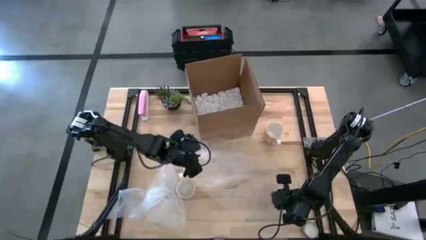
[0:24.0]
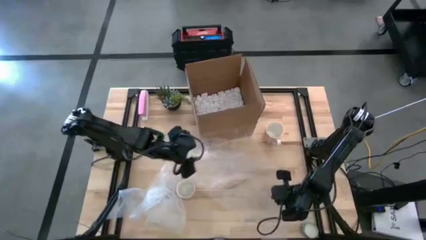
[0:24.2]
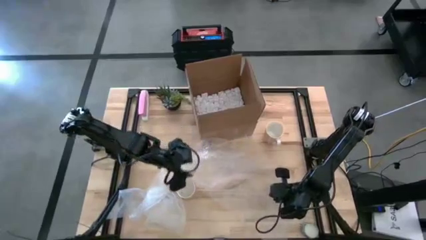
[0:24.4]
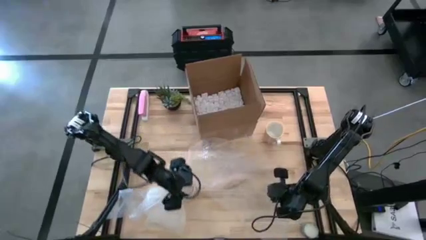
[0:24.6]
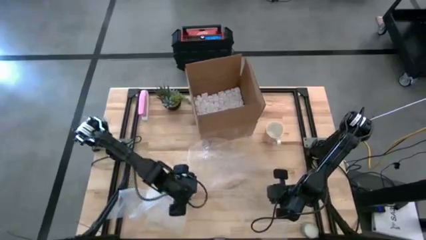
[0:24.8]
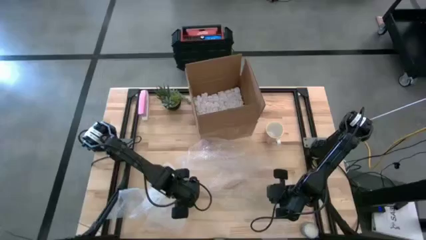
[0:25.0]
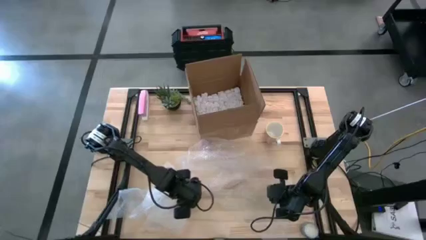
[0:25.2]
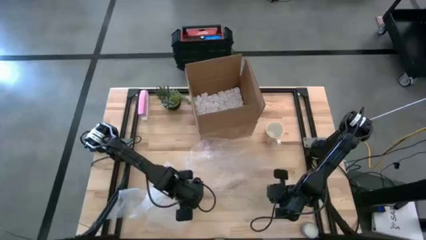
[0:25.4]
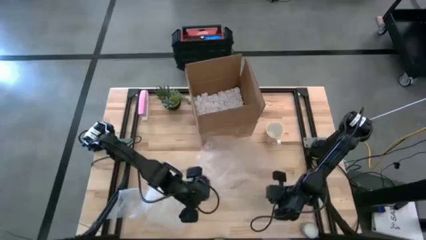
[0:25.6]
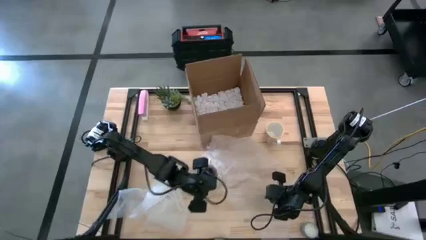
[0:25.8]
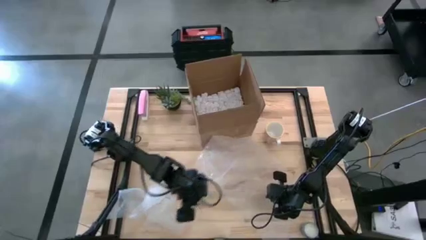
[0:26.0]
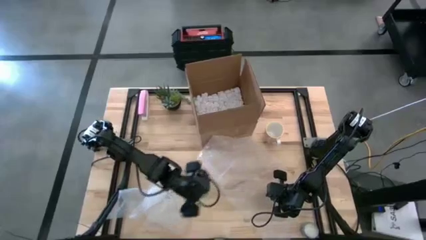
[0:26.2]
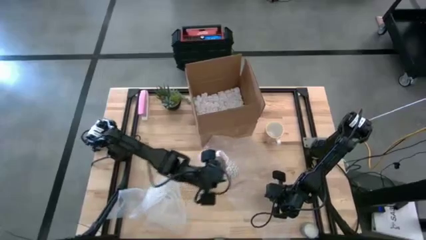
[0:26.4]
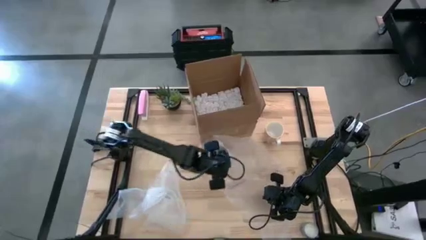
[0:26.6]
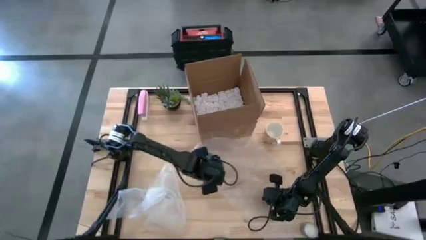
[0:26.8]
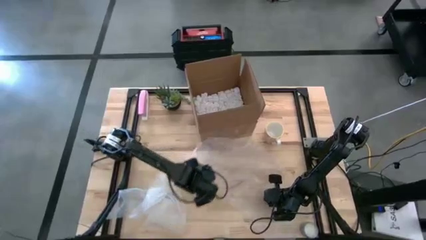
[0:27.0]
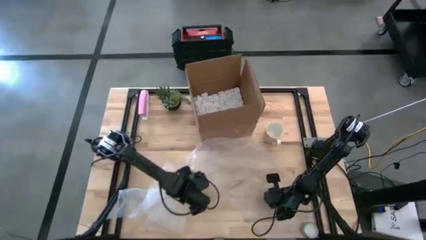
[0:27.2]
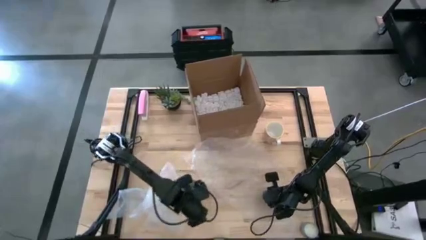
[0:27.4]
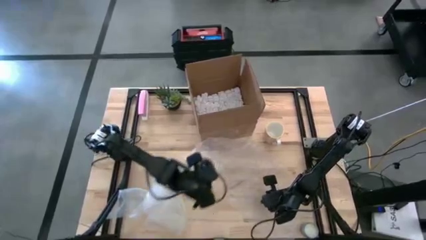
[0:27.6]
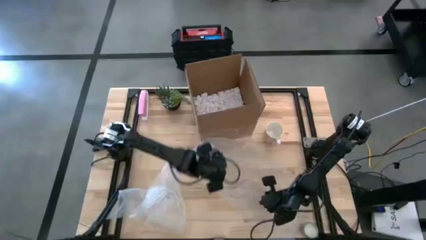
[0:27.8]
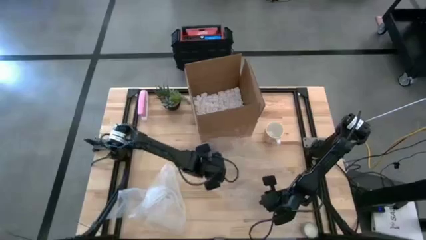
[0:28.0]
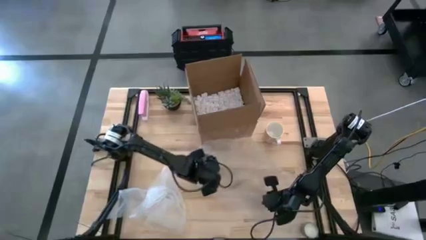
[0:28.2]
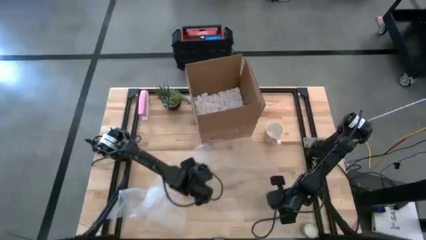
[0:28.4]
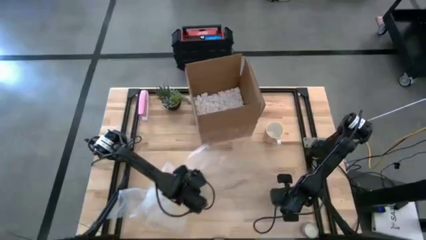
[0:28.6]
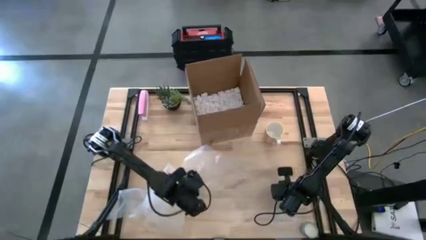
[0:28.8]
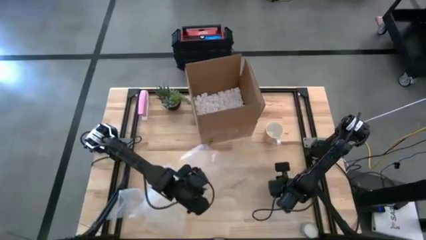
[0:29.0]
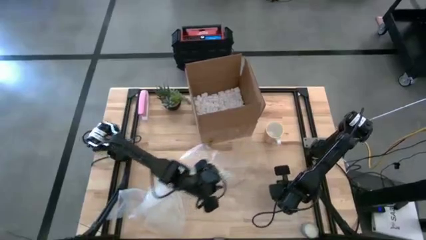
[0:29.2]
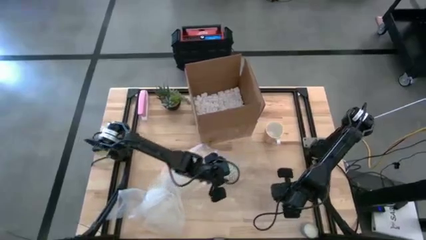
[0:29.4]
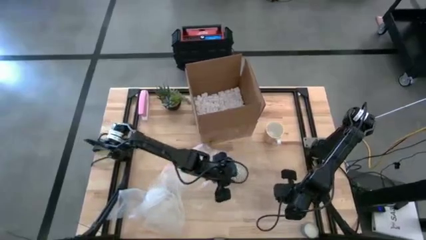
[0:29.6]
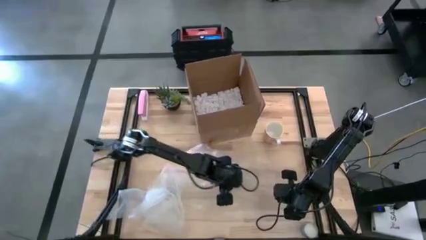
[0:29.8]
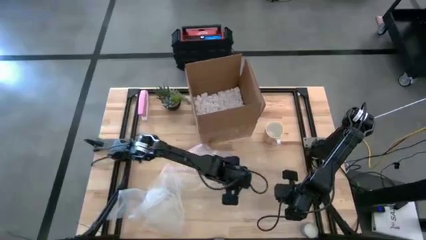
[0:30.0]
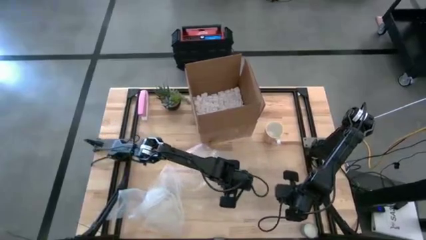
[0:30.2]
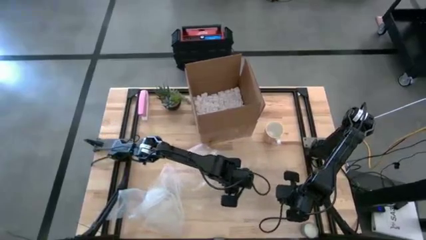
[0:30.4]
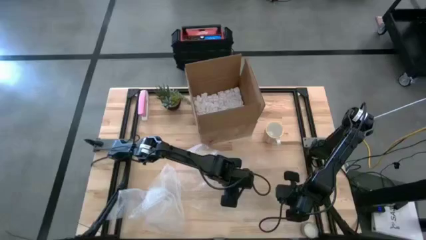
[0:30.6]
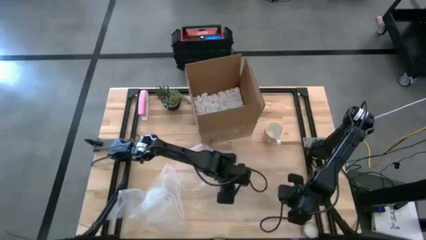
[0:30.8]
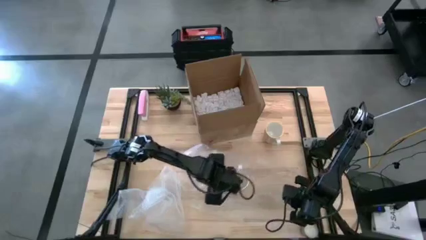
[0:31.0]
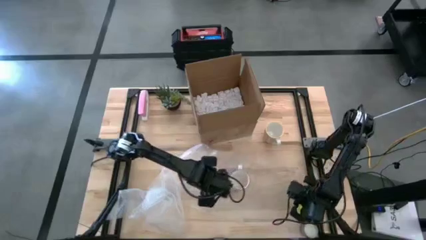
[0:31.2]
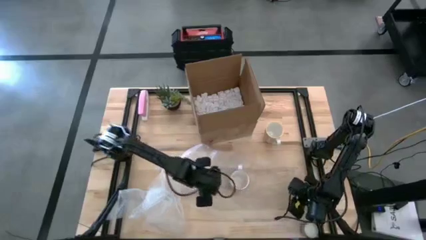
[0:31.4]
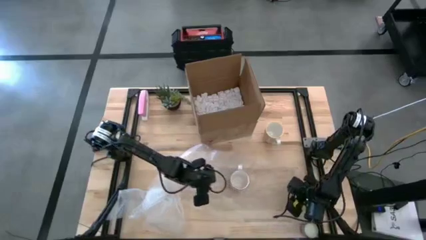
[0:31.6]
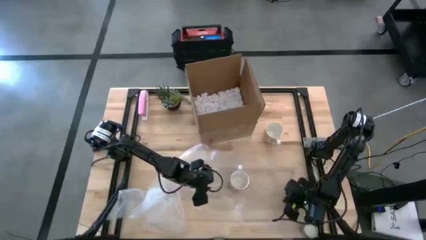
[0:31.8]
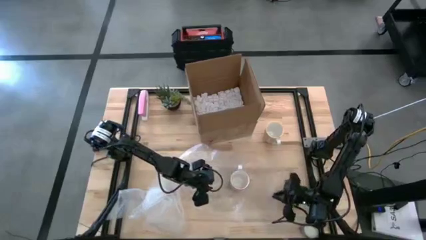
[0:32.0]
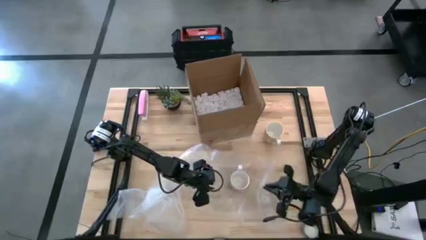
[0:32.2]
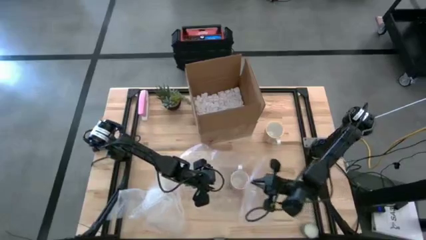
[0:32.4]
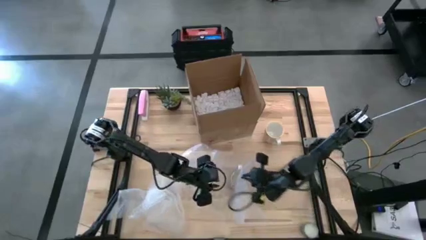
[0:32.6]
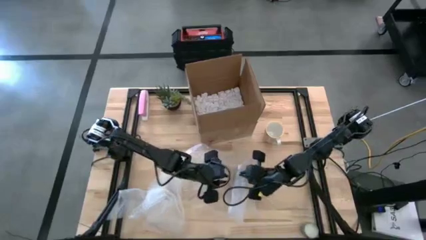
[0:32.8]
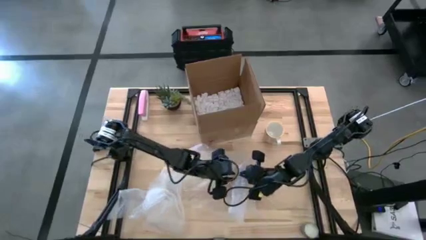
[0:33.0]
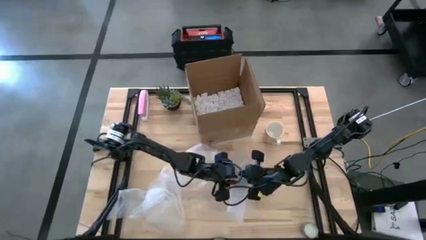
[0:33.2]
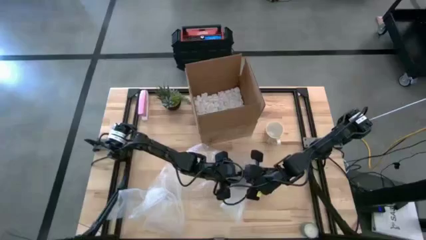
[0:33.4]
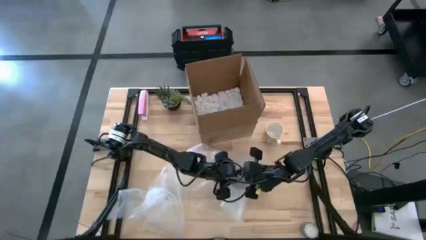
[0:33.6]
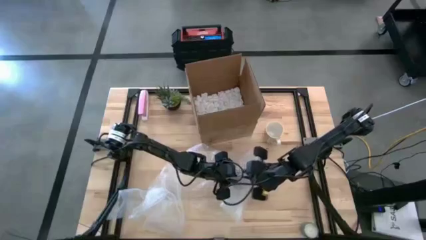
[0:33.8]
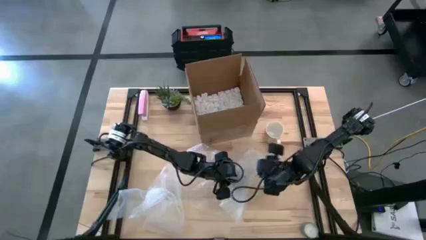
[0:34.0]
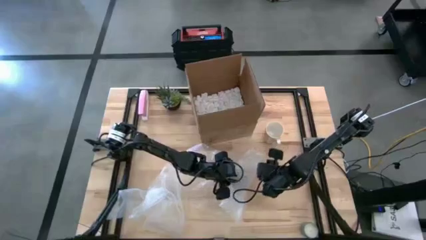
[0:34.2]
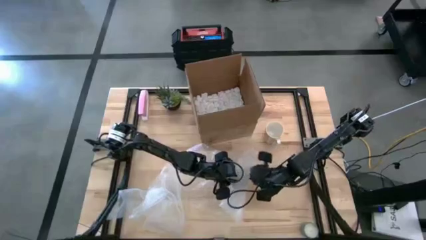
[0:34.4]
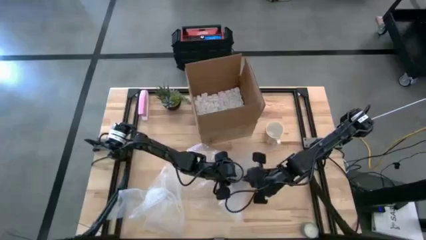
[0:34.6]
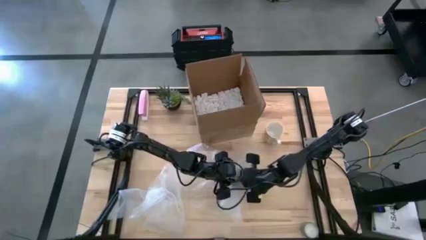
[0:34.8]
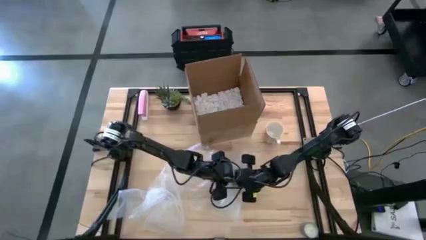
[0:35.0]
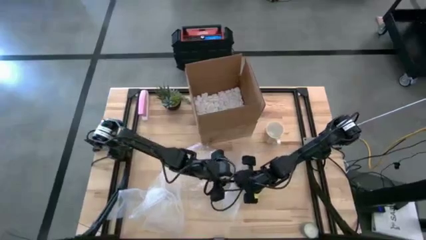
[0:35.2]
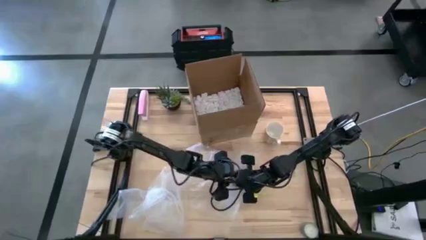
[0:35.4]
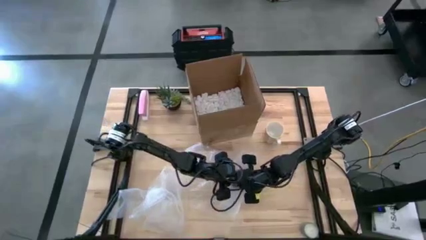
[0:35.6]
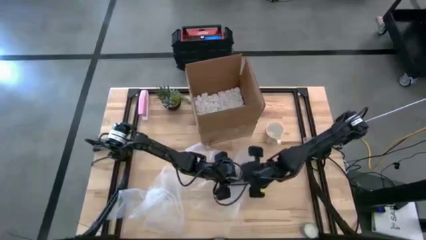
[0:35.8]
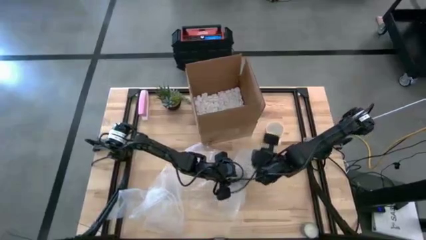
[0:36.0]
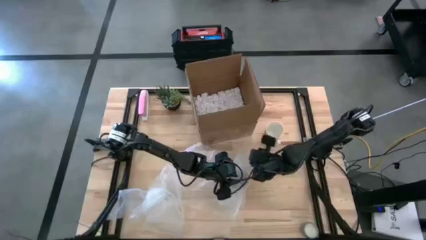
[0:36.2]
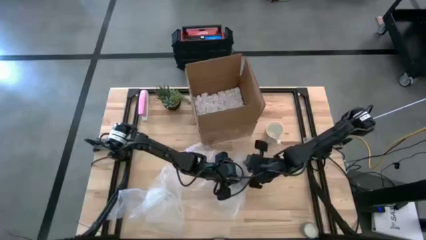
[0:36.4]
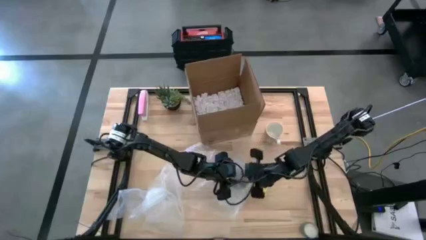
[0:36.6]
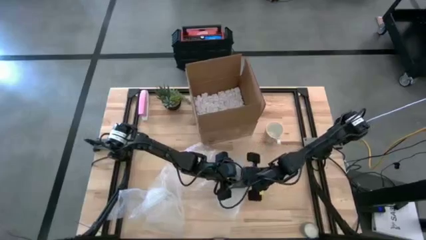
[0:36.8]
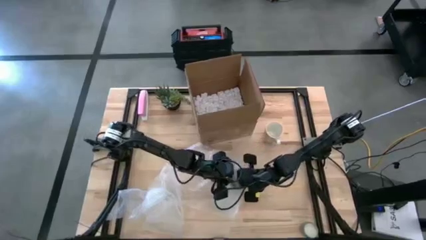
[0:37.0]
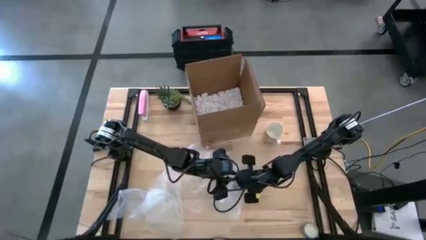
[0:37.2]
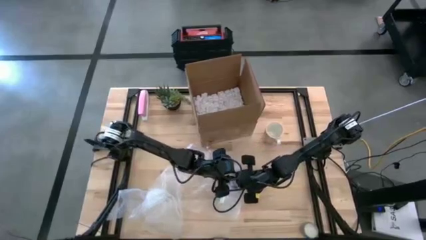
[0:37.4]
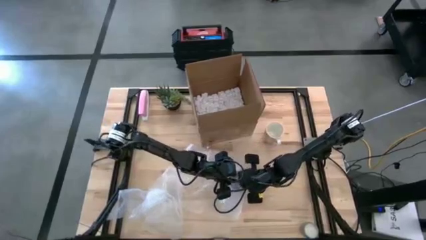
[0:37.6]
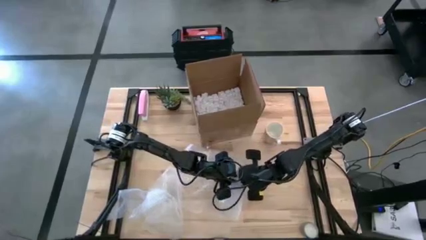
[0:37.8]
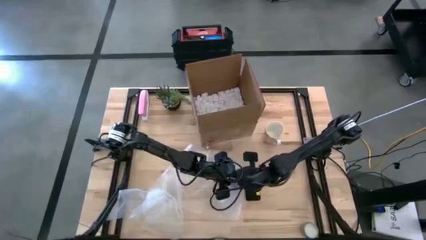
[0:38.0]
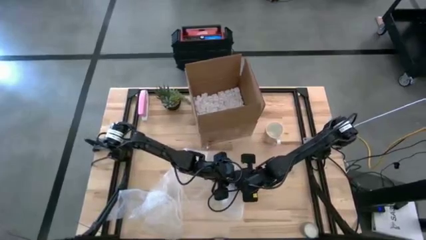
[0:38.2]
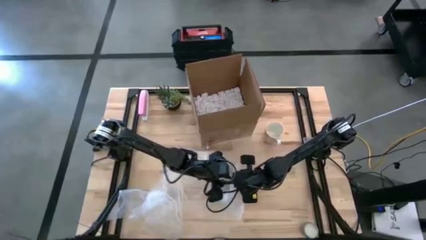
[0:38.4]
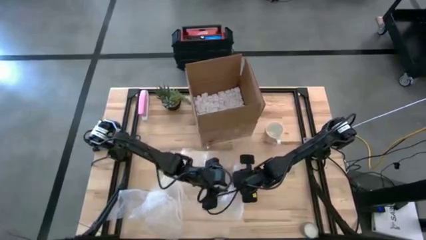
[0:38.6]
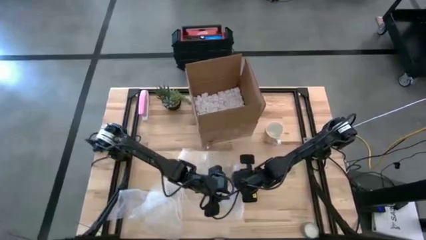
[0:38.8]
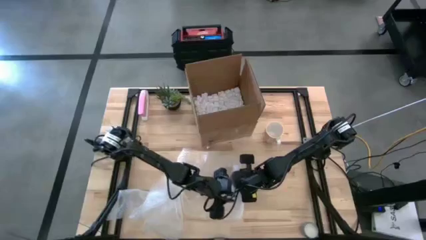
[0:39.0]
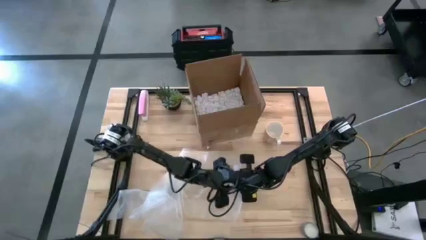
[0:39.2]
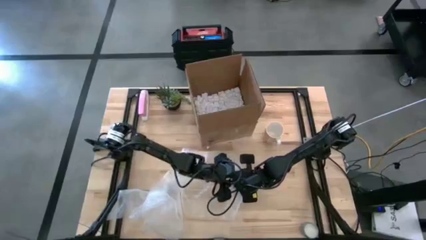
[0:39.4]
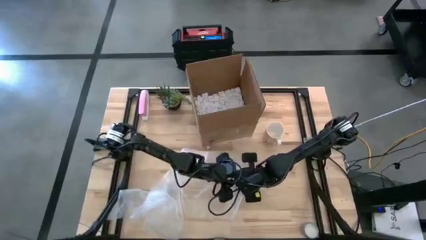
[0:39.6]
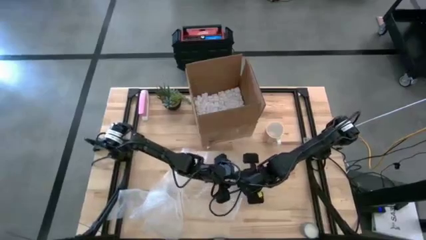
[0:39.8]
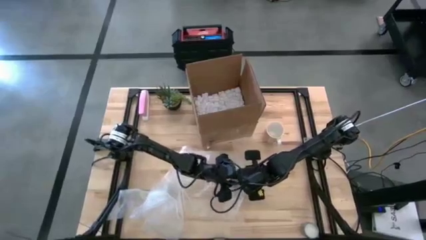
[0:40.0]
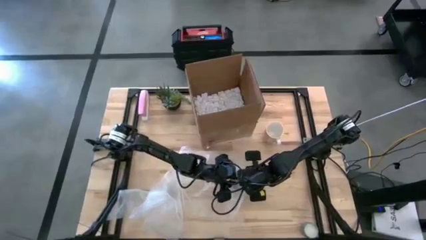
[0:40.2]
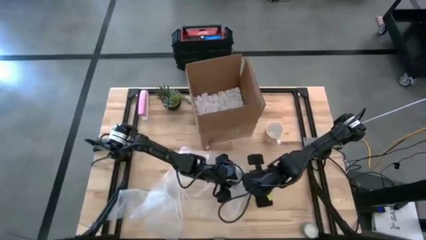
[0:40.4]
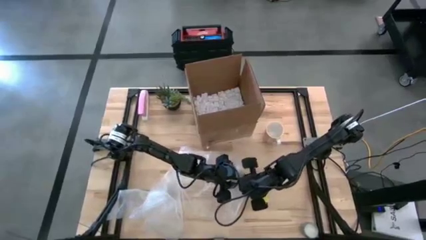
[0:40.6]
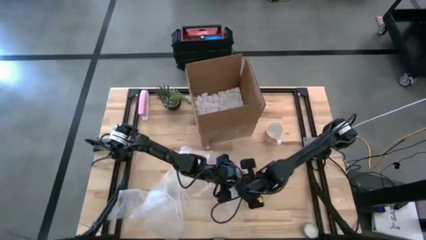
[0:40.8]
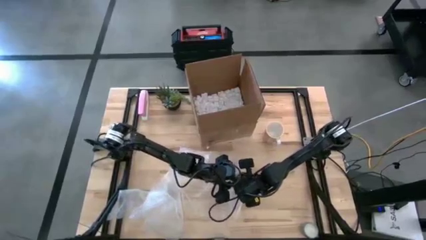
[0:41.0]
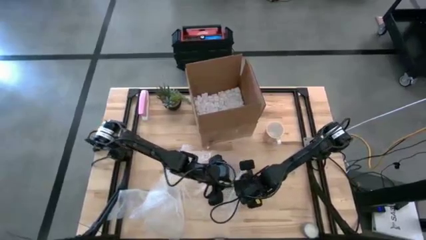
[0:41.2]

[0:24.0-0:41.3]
Task: wrap mug
Wrap the gray mug with bubble wrap
